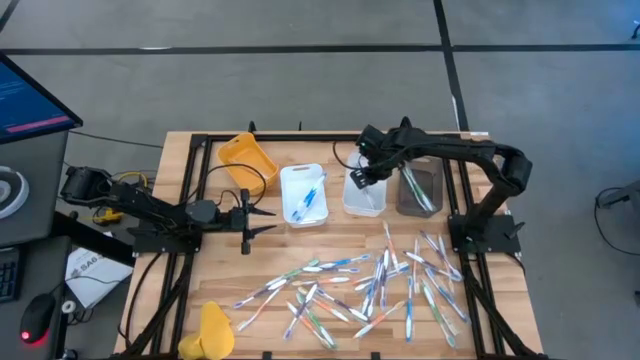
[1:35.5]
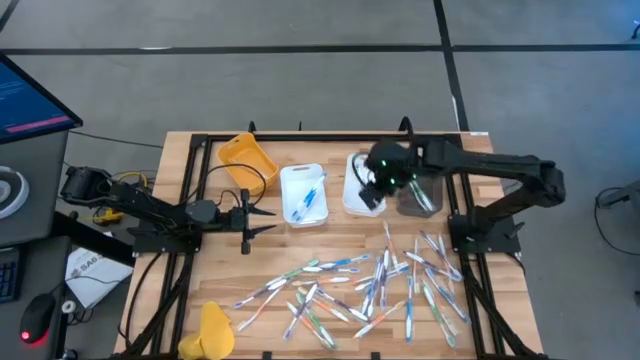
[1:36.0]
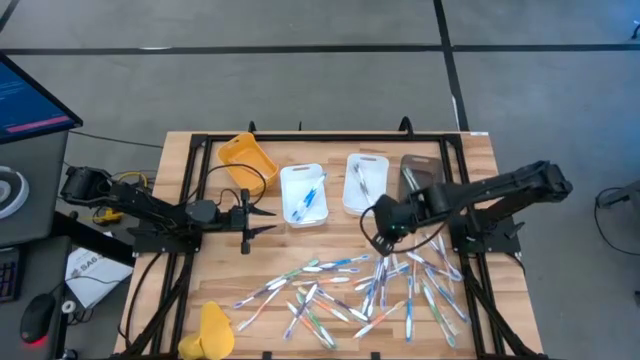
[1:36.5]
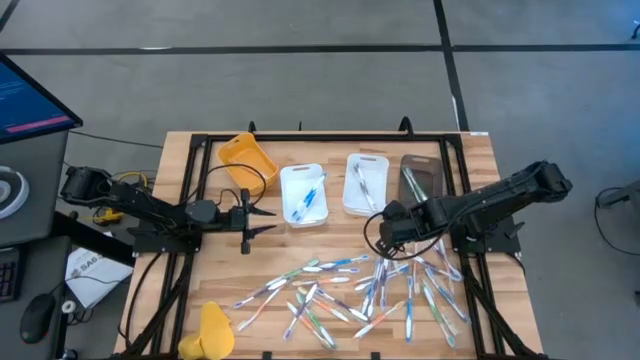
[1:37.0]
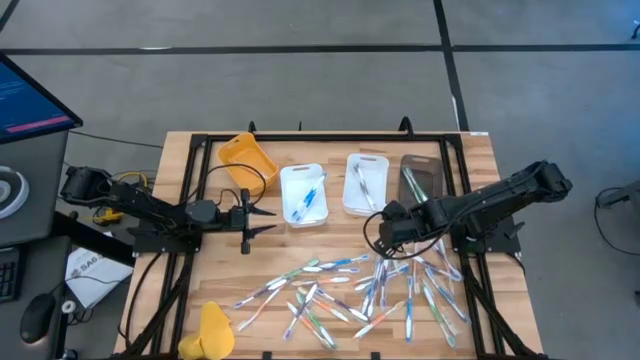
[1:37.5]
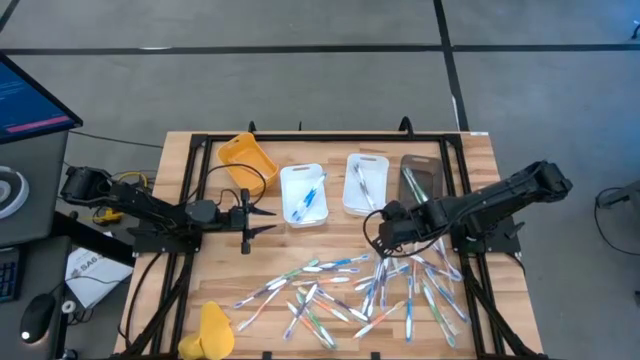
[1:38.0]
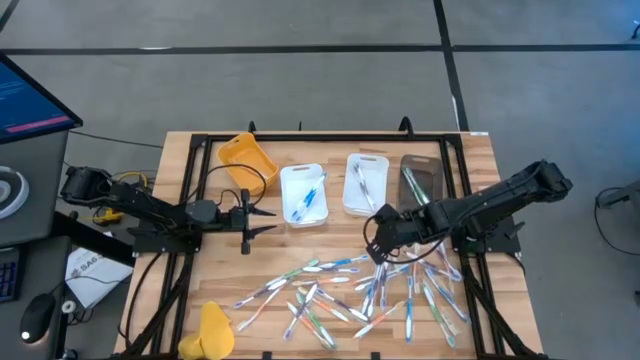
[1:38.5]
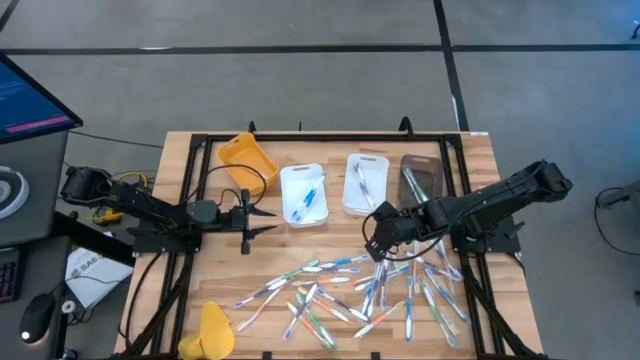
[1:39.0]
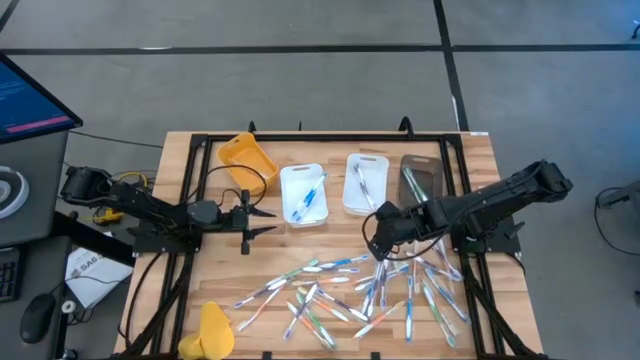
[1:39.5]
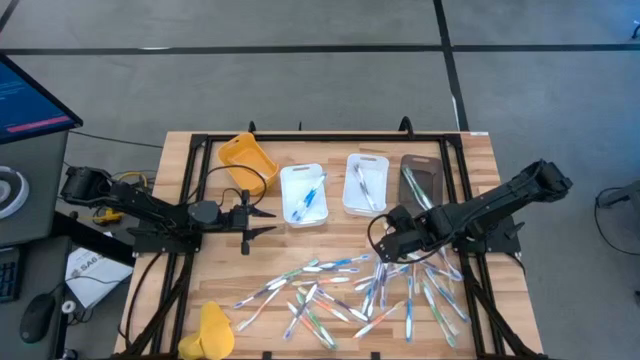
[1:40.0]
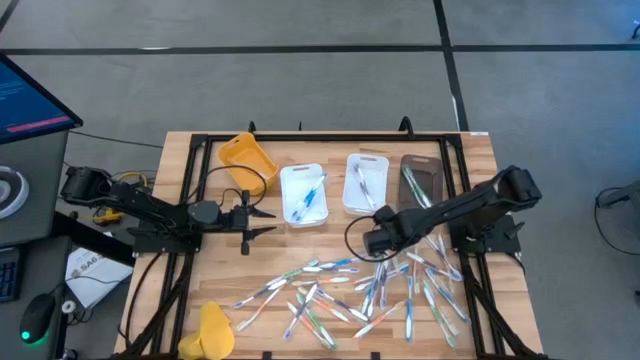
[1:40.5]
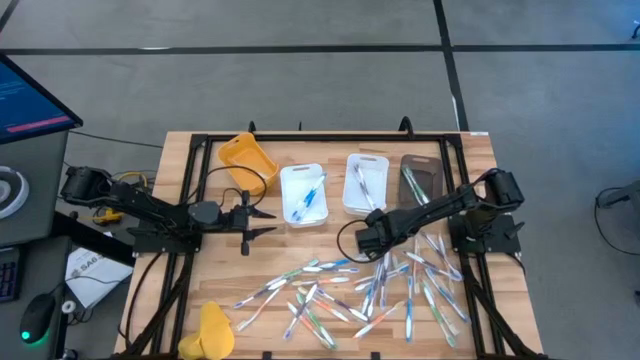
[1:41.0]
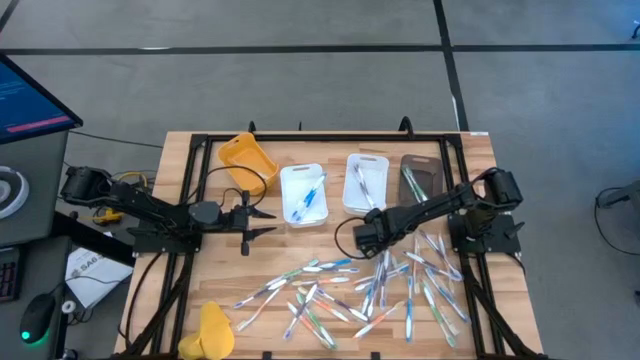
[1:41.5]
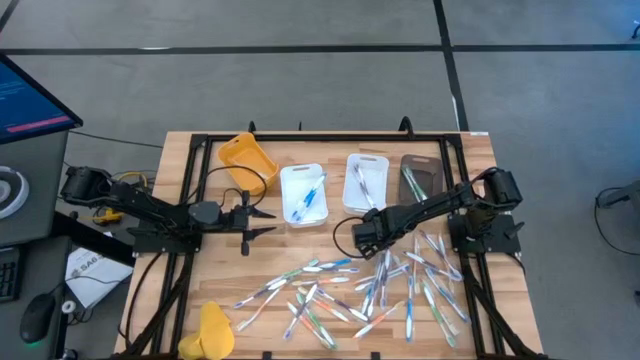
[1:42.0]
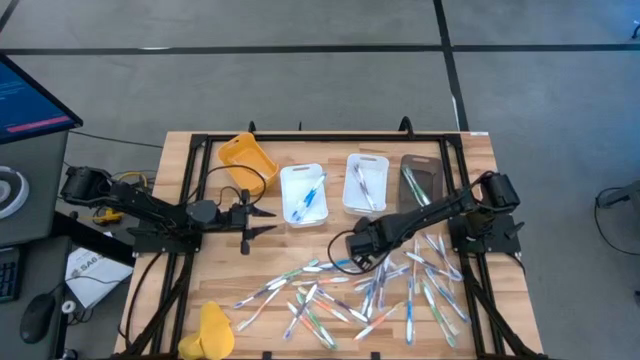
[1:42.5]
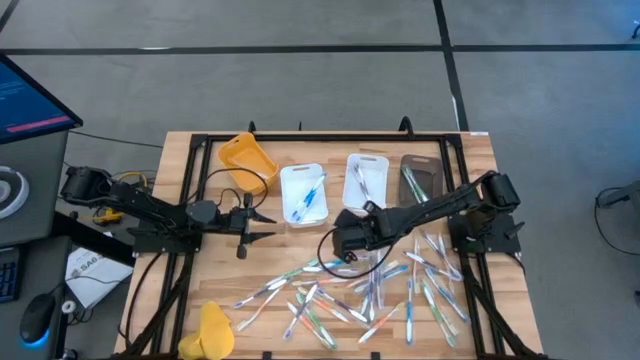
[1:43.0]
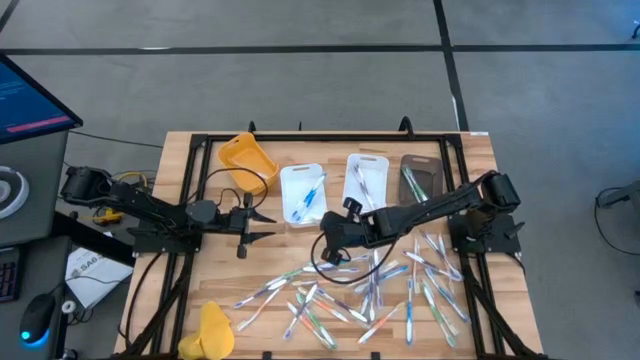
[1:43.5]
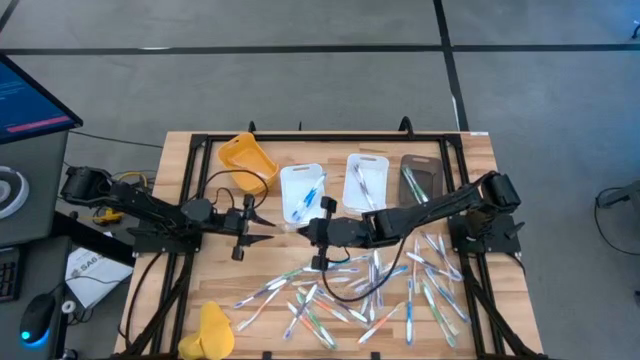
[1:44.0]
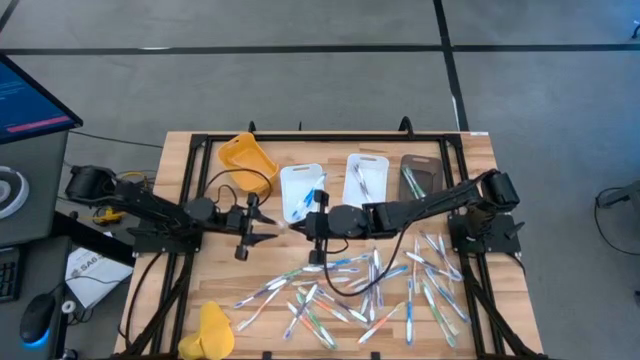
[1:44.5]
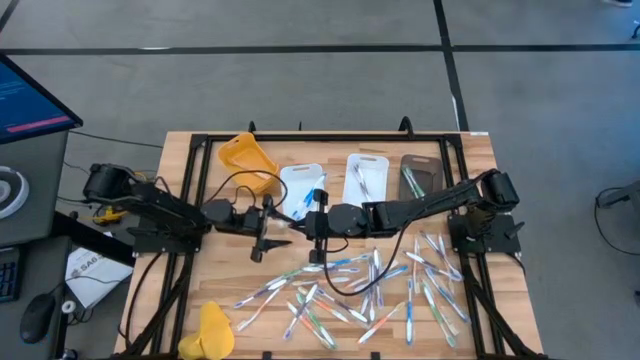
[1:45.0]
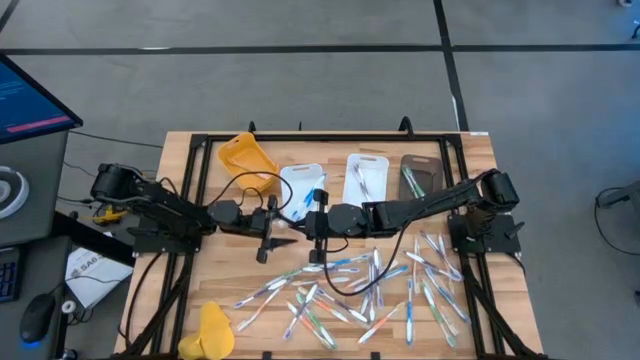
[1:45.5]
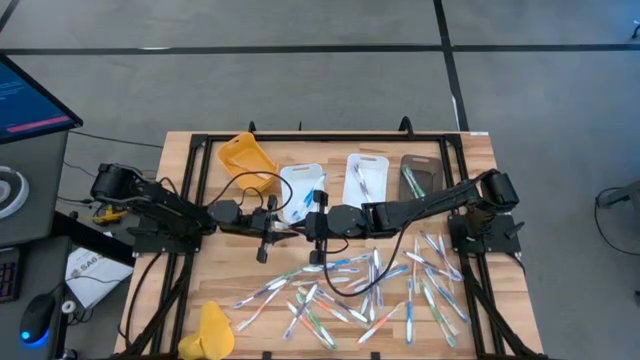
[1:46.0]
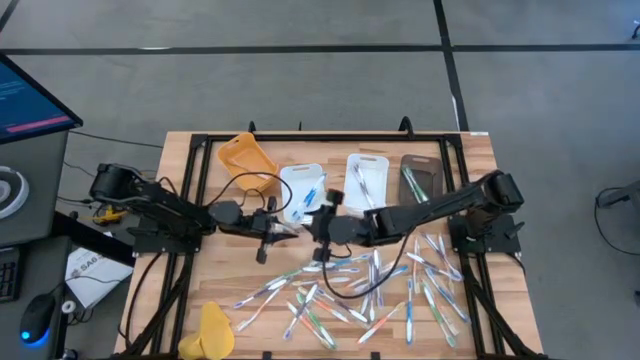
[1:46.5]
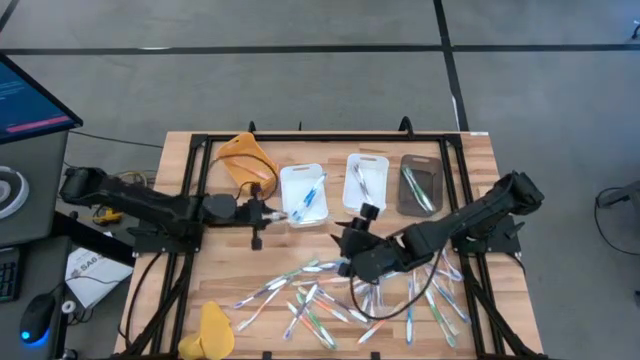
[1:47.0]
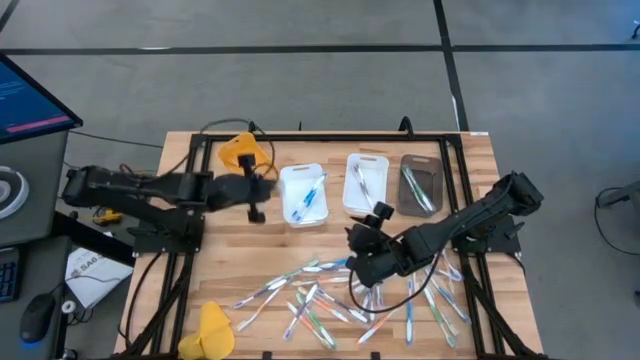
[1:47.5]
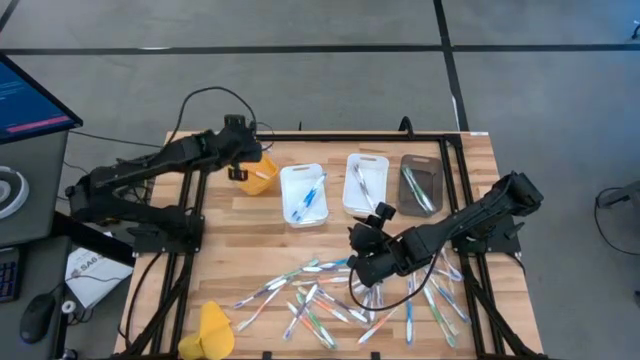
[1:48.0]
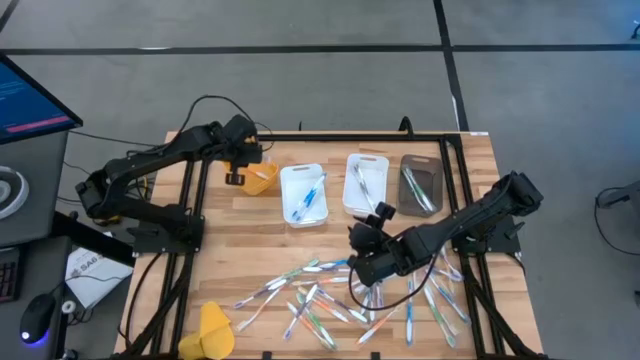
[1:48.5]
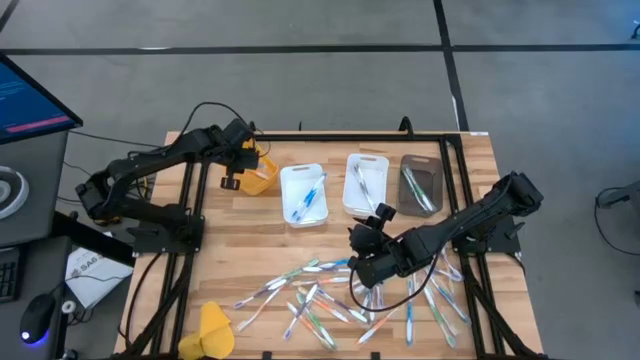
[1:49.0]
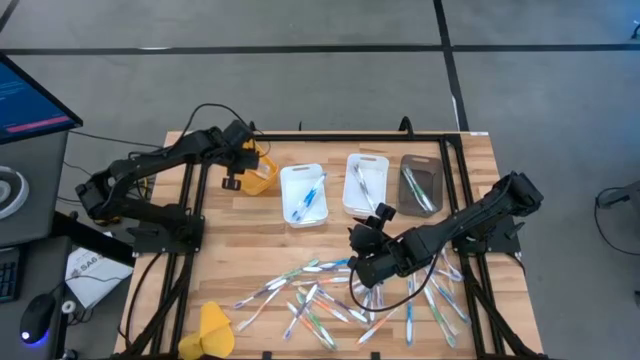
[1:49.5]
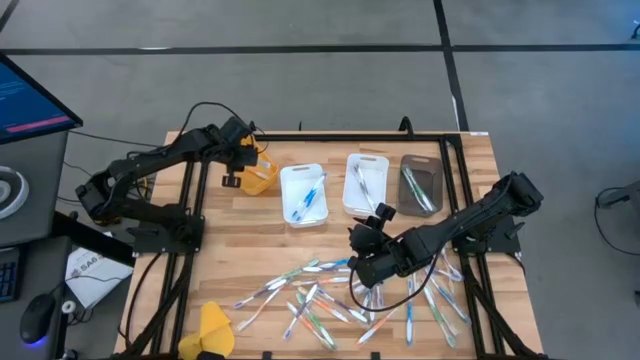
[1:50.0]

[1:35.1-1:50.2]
Task: Pick & Place Toothbrushes
Put the orange toothbrush into the orange bin

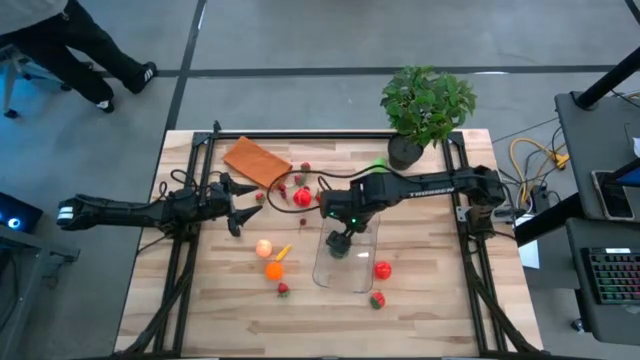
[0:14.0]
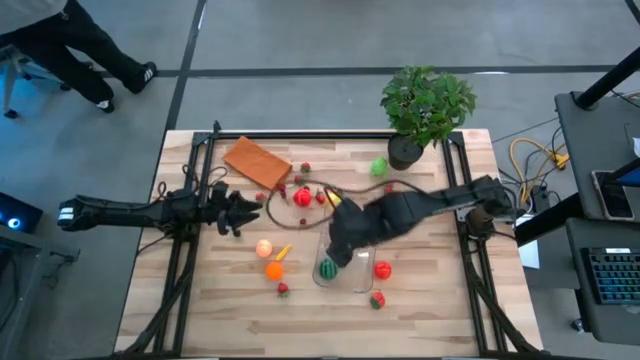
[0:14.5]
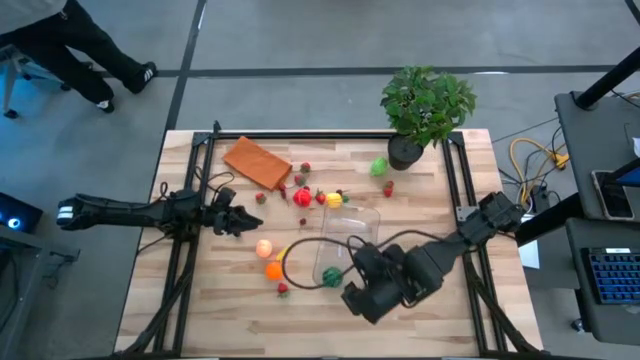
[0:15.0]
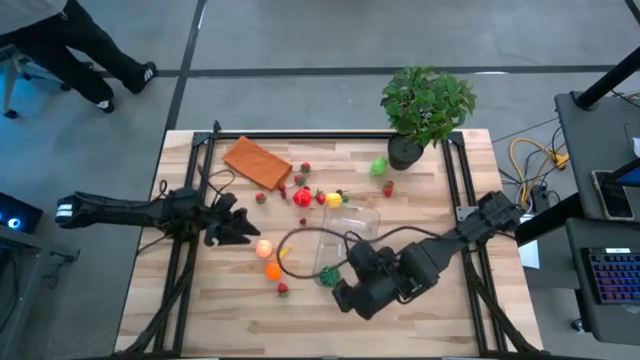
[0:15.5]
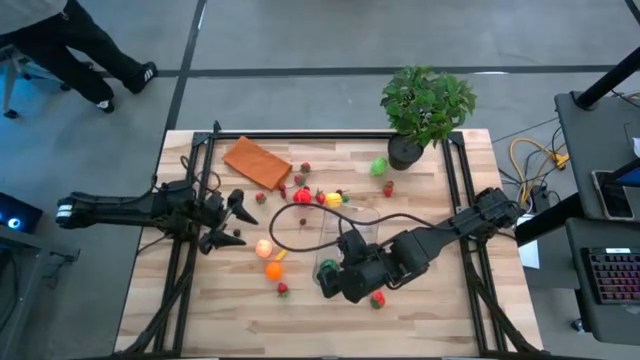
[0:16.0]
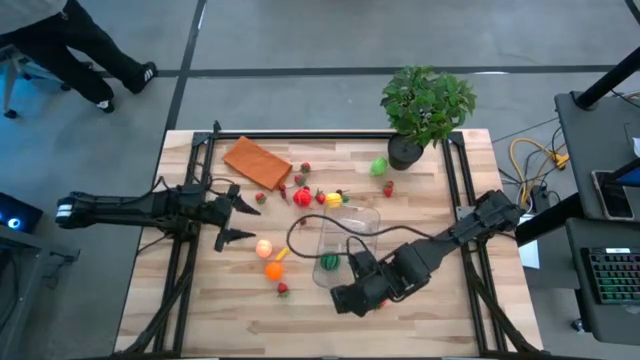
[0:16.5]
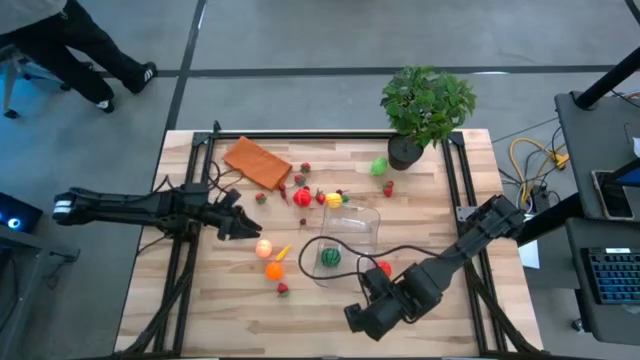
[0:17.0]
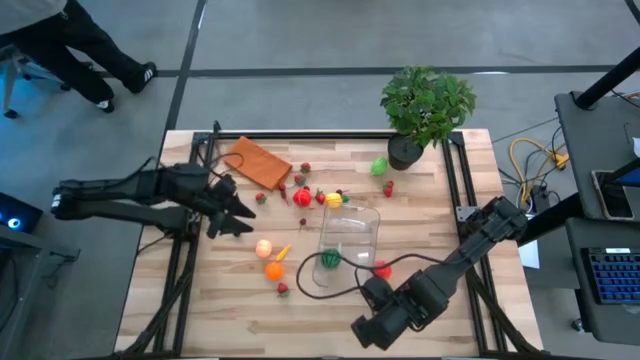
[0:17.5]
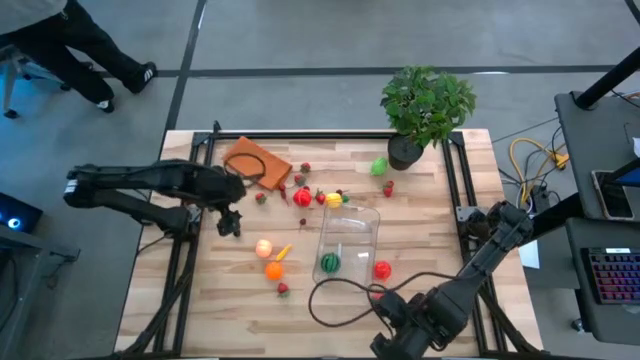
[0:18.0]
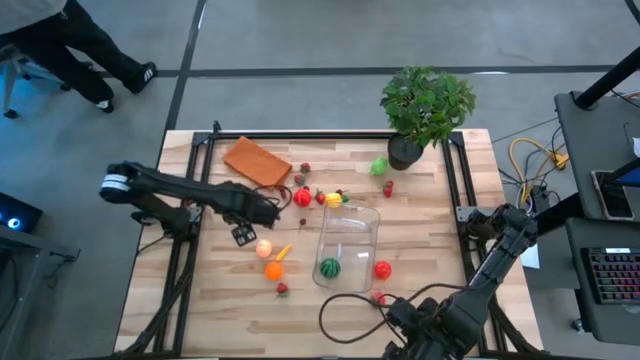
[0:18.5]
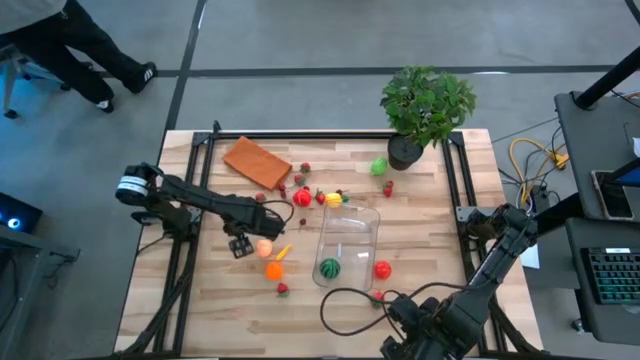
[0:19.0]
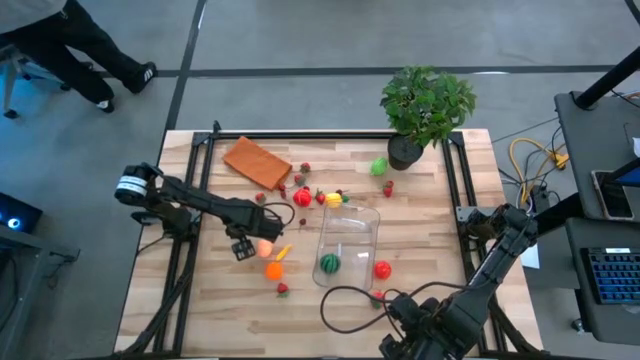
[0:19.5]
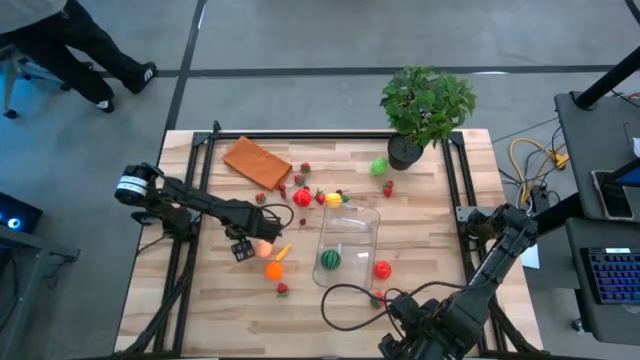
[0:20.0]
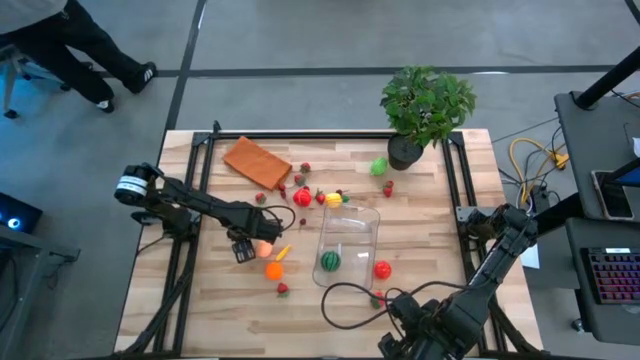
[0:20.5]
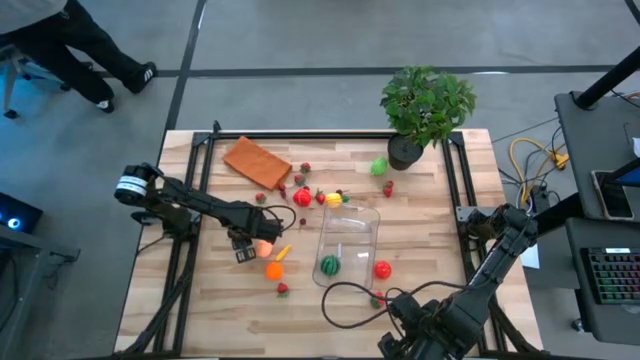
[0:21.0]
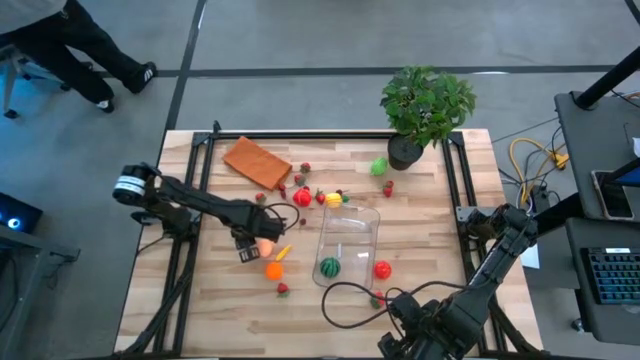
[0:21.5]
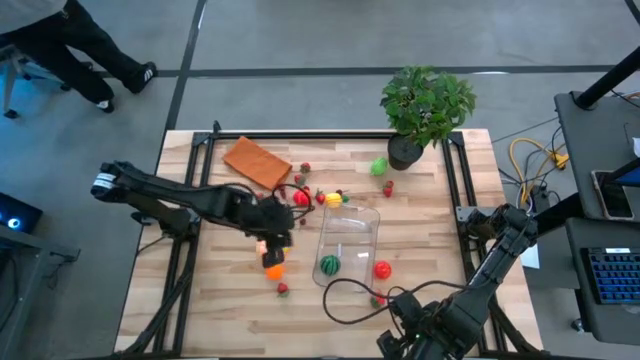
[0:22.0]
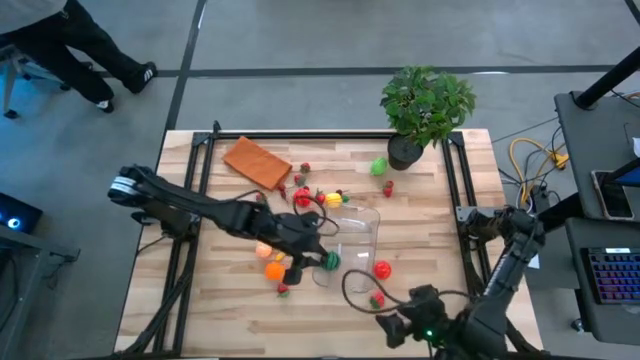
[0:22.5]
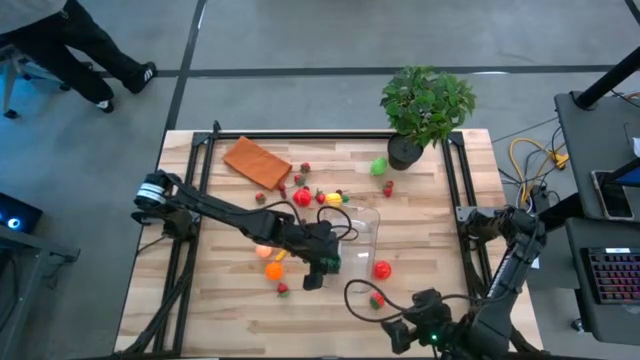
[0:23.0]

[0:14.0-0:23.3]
Task: Pick and placing Produce into tupperware
Put the blueberry into the transparent bin
